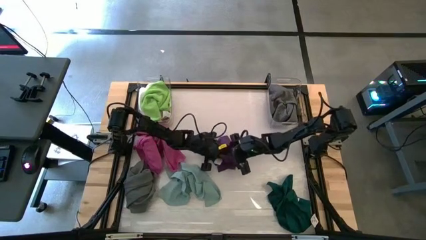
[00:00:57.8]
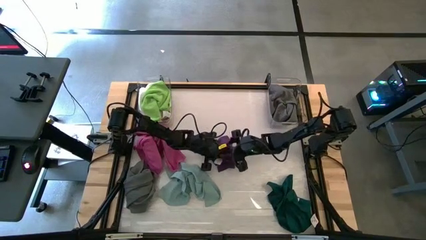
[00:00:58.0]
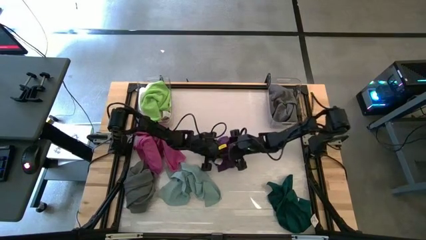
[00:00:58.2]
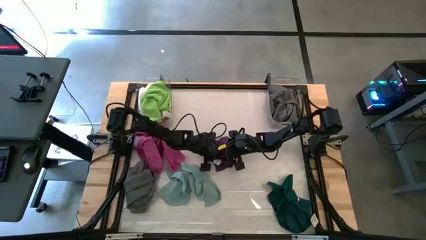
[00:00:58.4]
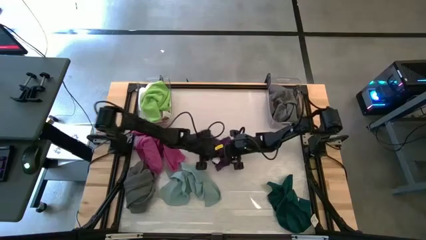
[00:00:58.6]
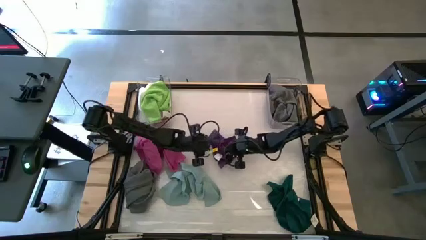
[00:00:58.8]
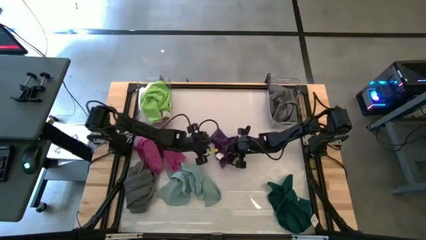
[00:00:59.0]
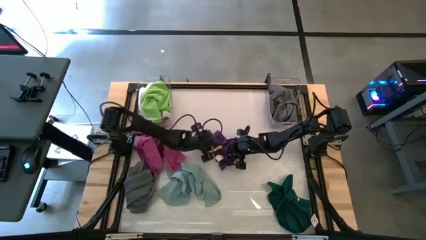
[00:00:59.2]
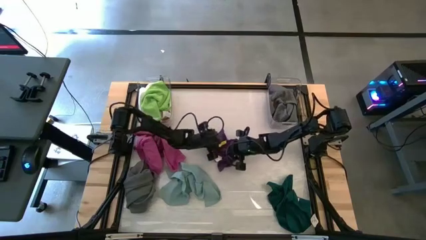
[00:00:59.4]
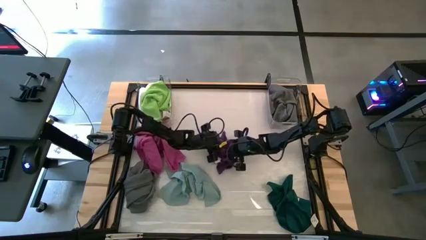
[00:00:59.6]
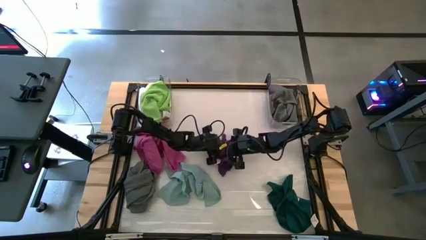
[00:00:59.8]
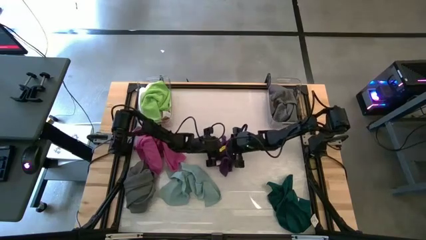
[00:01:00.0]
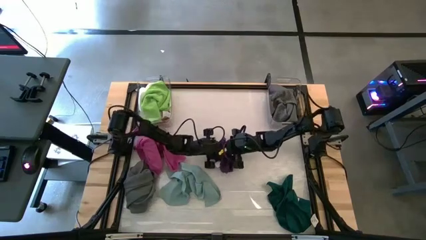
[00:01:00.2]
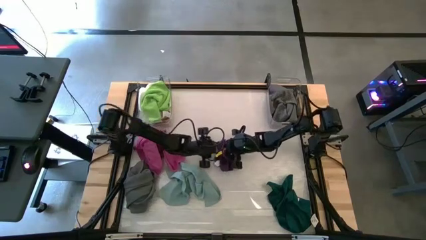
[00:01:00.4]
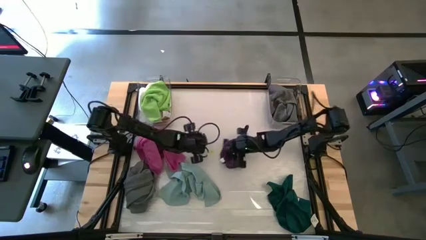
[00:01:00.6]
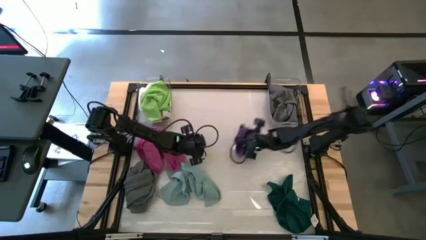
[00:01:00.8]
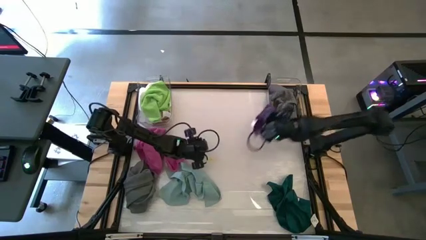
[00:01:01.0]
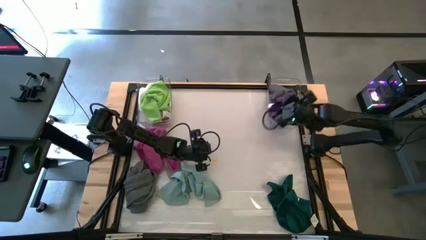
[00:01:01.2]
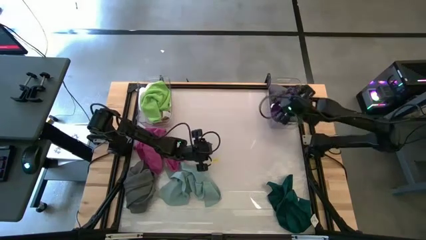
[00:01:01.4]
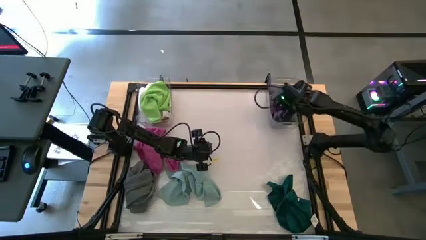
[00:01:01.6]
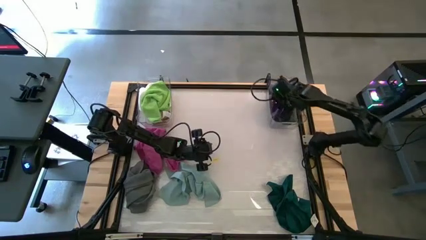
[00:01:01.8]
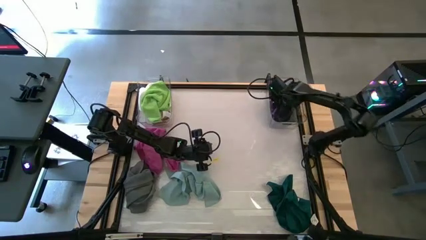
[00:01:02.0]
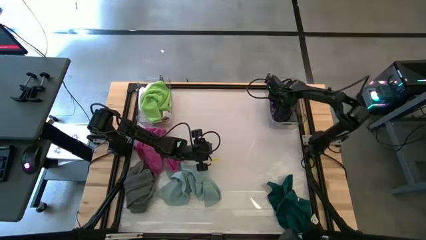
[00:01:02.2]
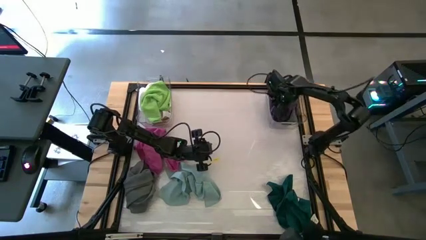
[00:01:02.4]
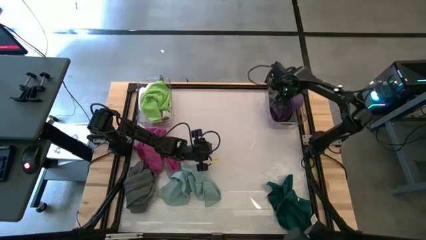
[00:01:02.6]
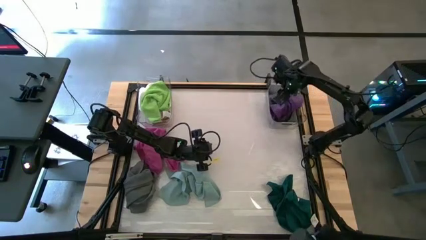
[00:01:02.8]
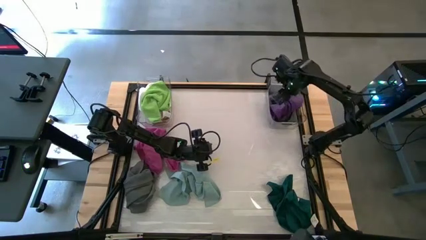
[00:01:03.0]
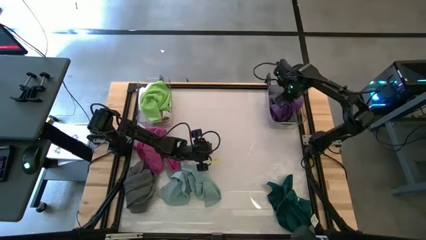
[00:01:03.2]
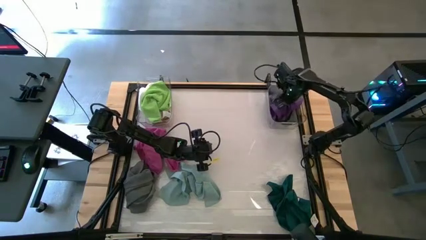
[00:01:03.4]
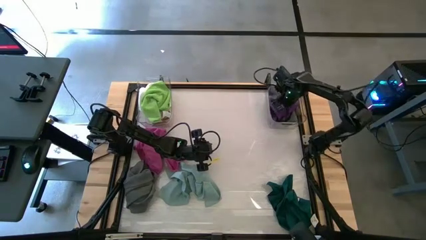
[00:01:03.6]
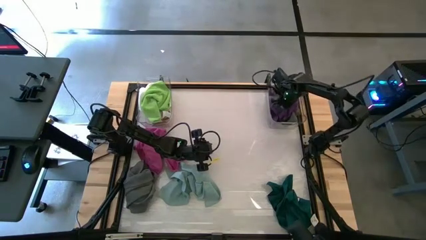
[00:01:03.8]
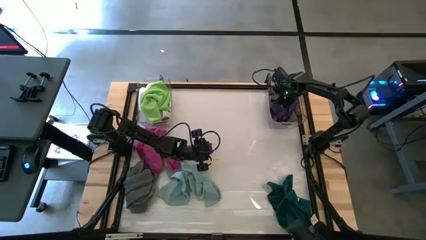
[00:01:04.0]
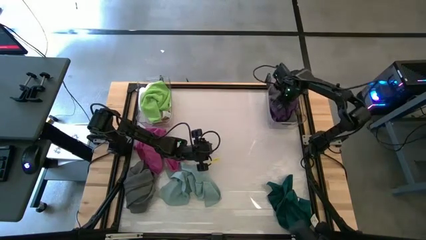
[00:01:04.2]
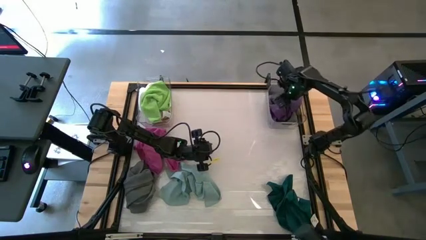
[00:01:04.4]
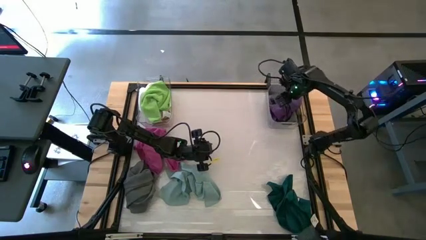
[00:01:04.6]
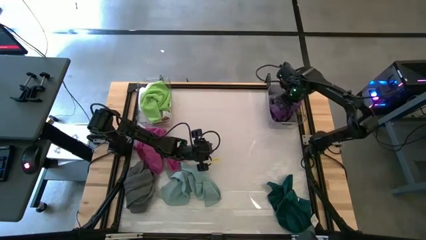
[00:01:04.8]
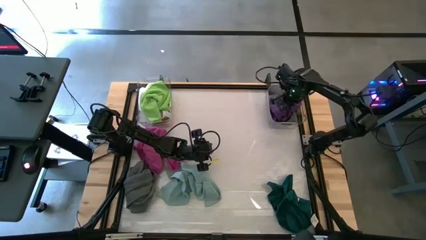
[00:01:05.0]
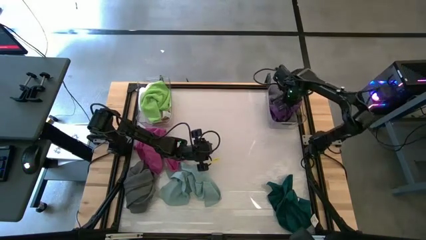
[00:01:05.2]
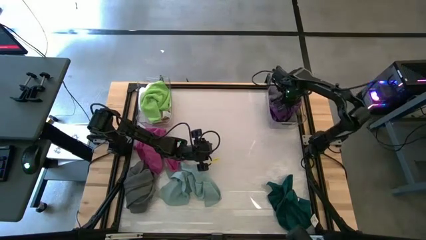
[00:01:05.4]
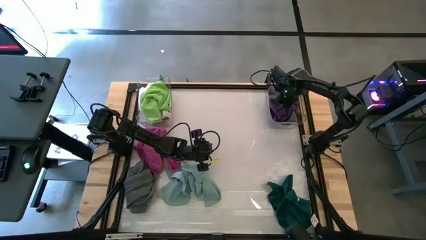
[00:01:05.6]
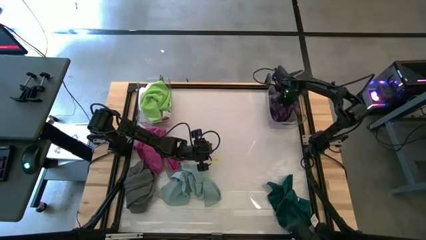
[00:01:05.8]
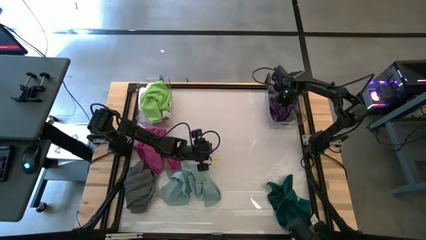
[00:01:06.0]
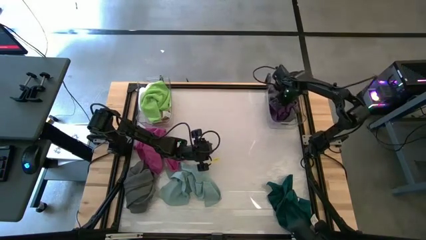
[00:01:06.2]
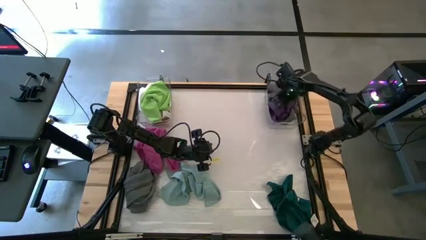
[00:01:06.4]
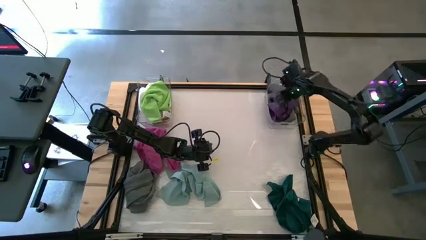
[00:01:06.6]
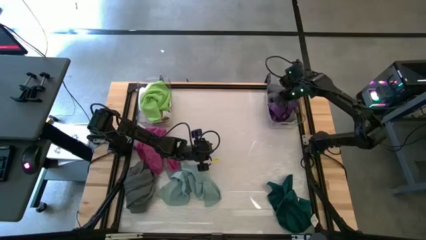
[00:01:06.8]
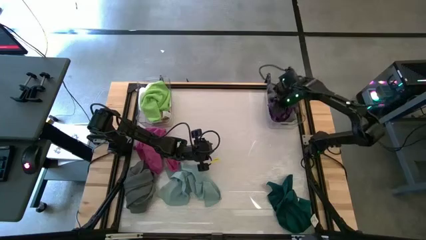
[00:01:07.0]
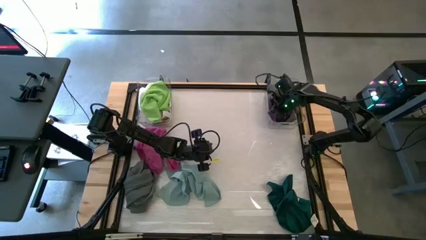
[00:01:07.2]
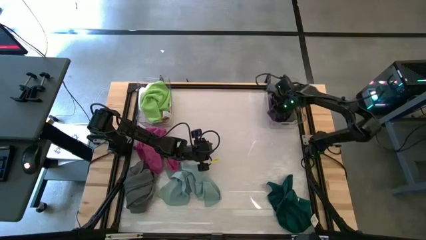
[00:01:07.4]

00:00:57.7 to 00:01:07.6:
Task: Sort towels by color in basket
Put the violet towel into the right transparent bin
